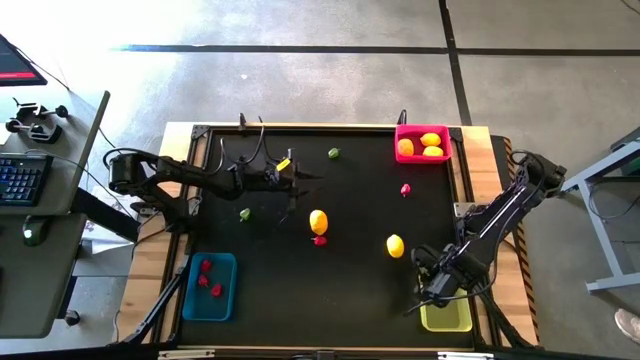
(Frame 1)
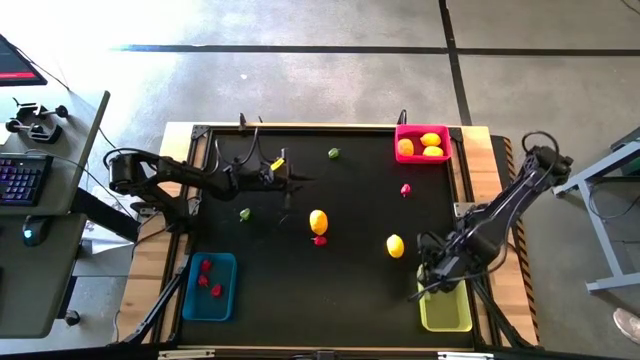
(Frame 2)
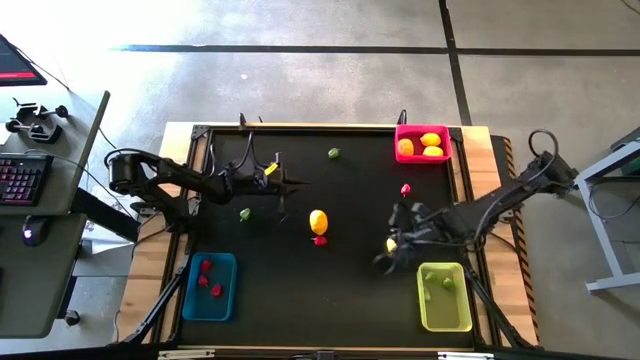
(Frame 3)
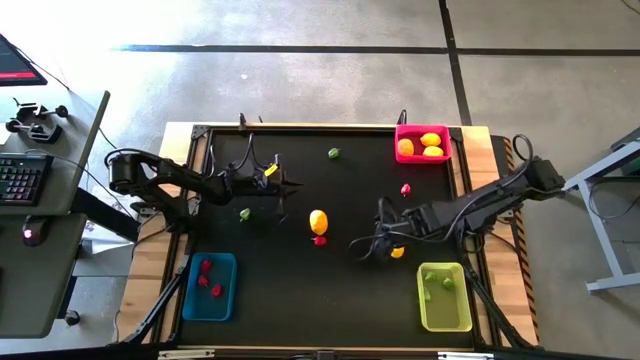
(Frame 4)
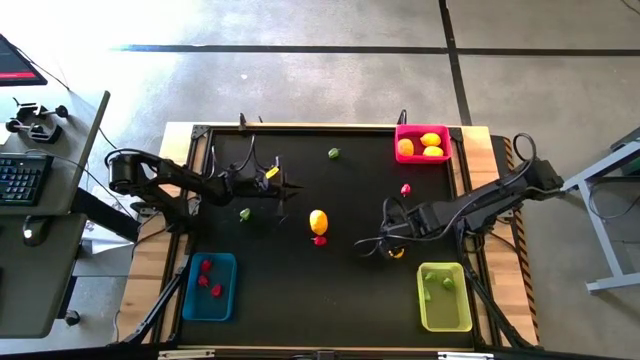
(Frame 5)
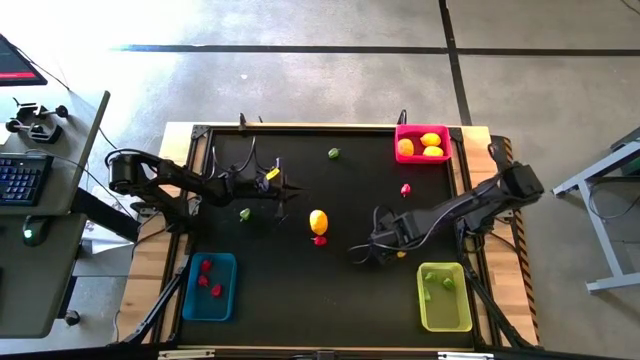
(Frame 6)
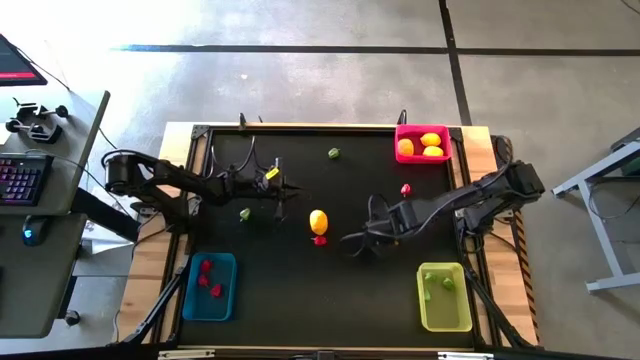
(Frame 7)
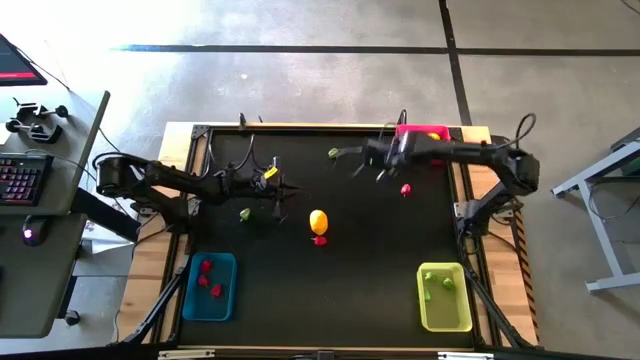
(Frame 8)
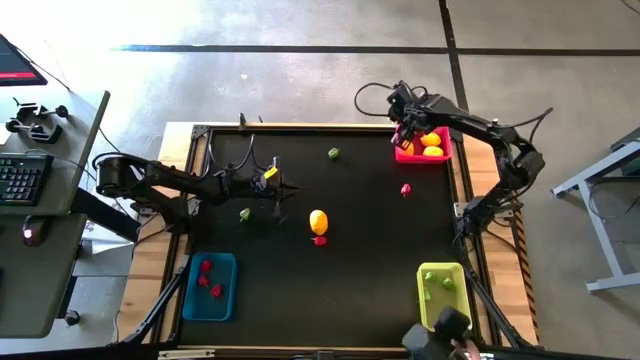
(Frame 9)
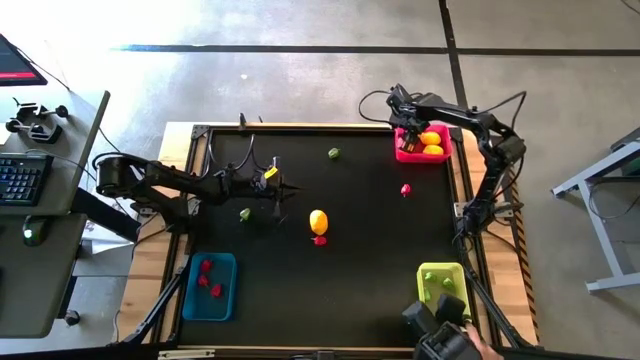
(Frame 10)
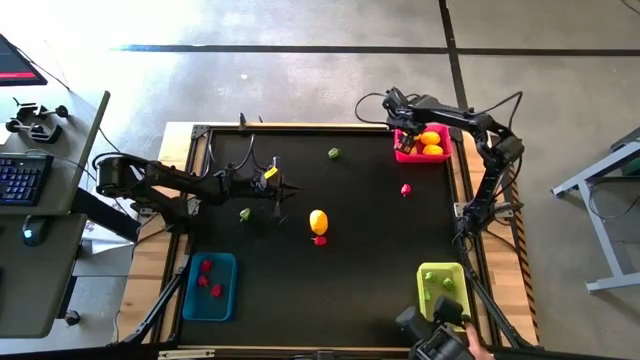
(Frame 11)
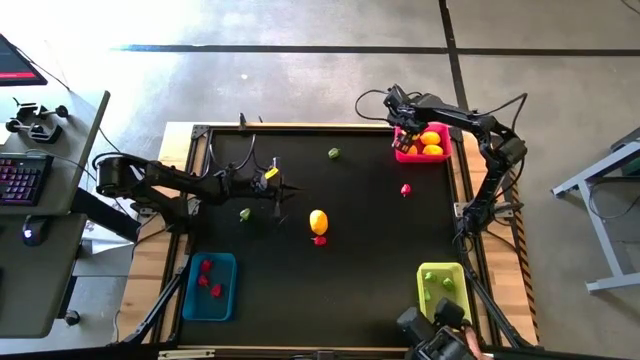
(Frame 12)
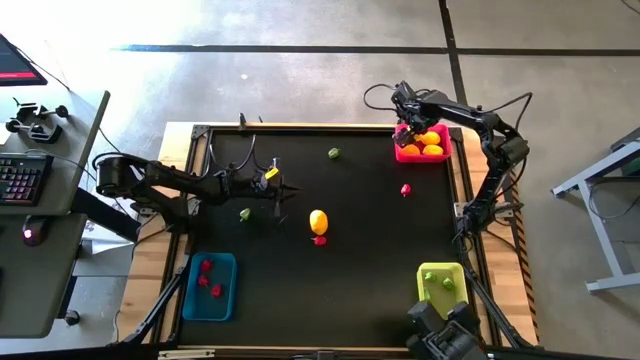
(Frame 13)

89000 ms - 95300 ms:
Task: Sort produce into baskets
Put the lemon into the pink bin

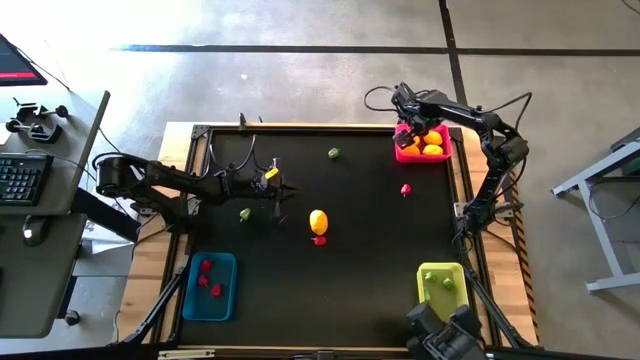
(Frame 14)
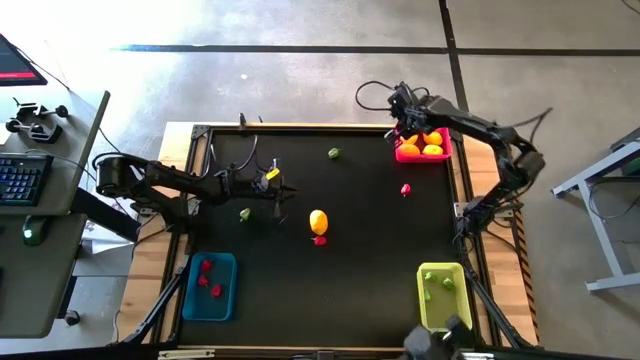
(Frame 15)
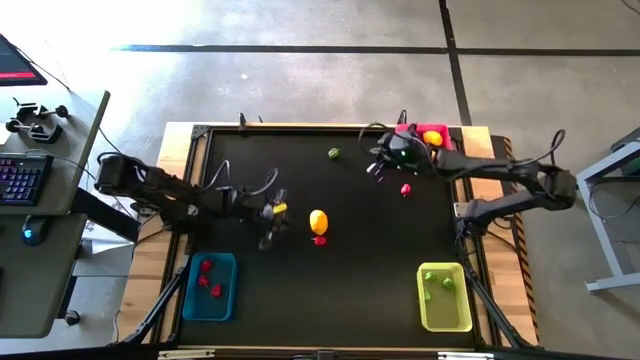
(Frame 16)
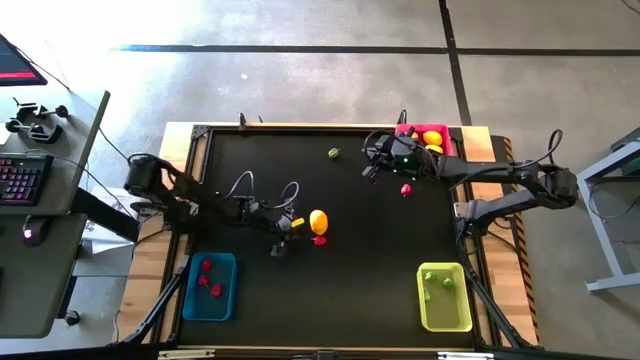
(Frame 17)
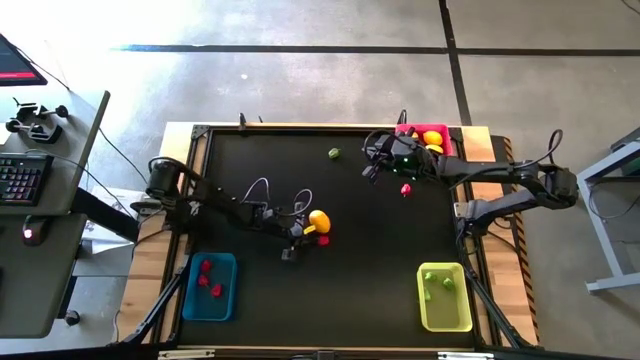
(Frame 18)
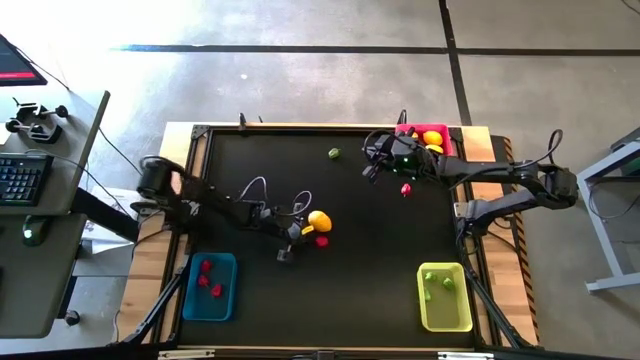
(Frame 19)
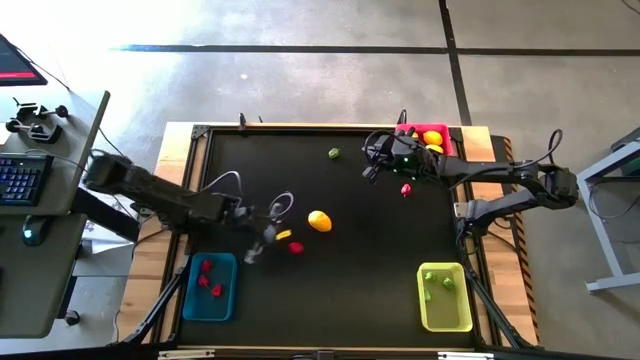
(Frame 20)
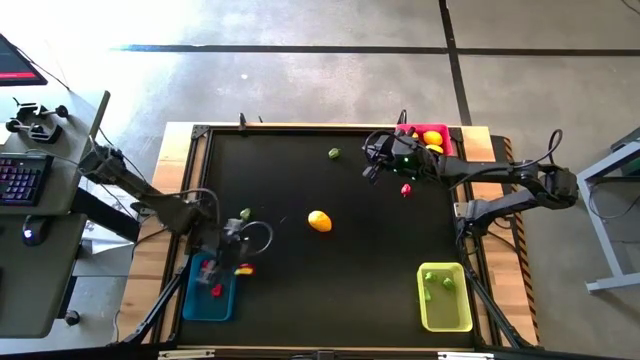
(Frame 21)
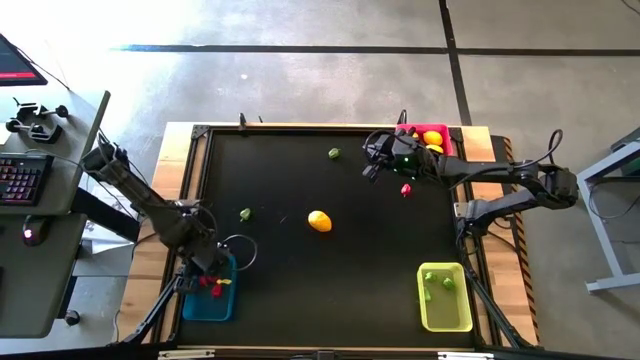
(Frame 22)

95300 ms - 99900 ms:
Put the red chilli pepper into the blue bin

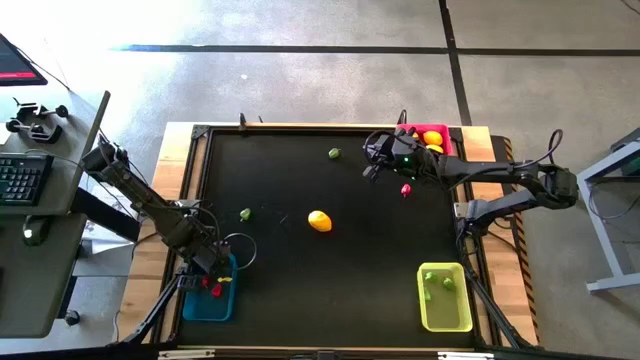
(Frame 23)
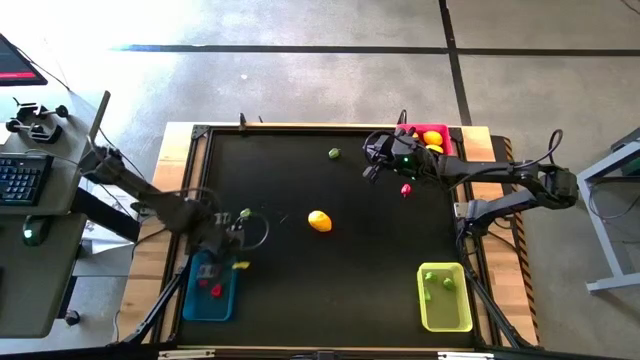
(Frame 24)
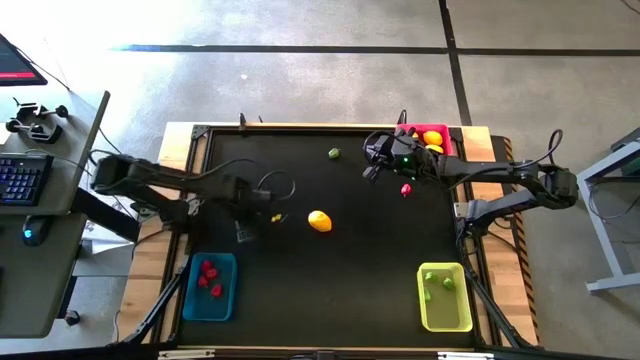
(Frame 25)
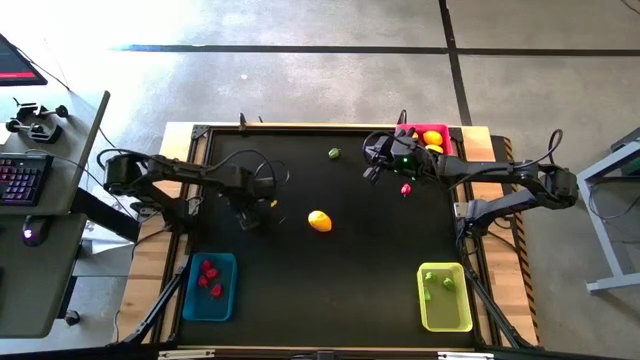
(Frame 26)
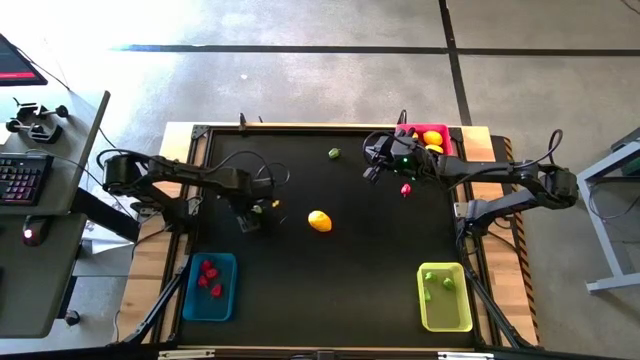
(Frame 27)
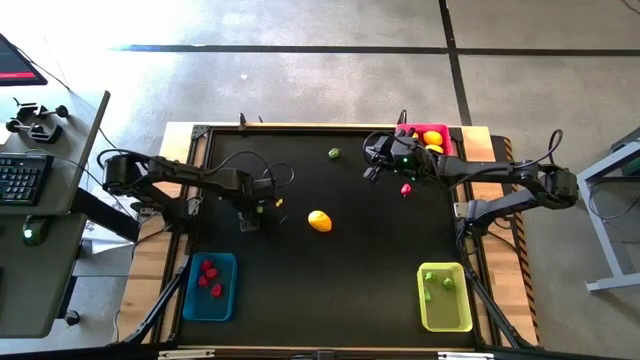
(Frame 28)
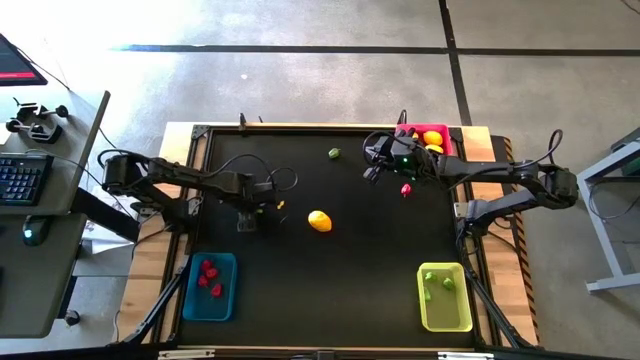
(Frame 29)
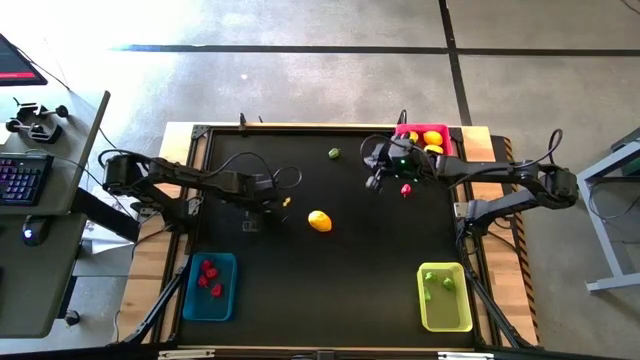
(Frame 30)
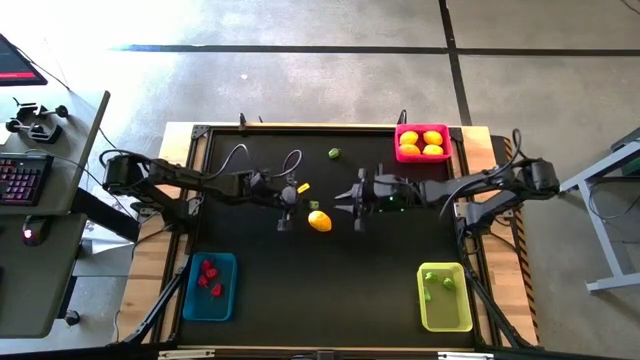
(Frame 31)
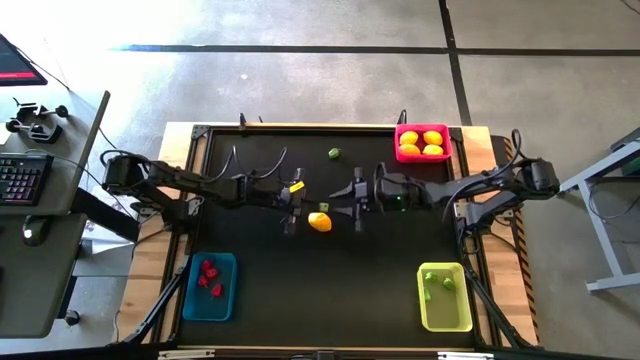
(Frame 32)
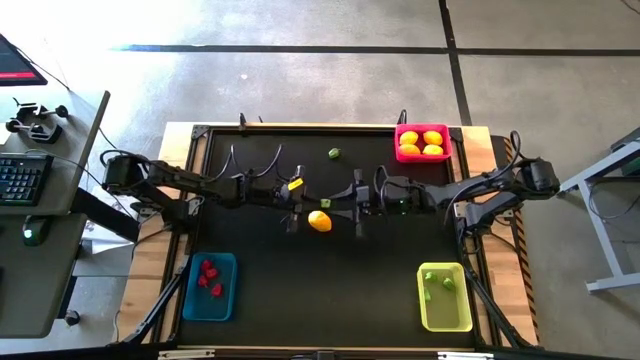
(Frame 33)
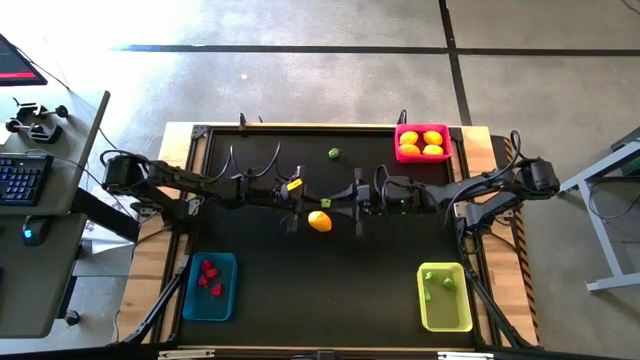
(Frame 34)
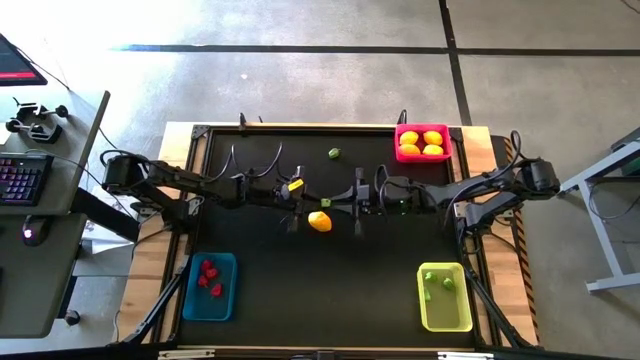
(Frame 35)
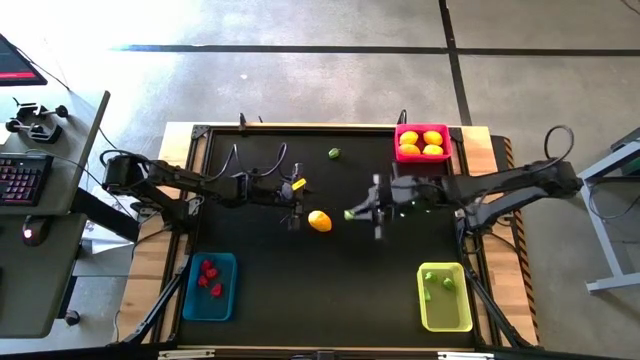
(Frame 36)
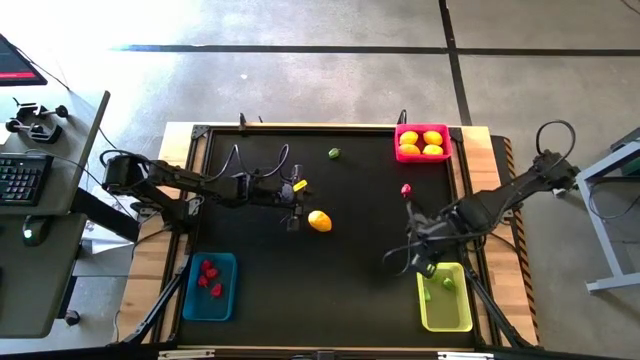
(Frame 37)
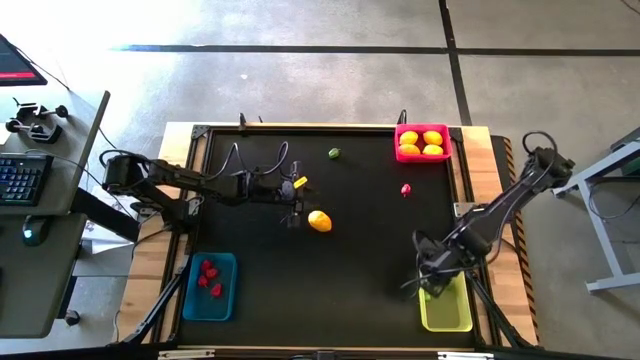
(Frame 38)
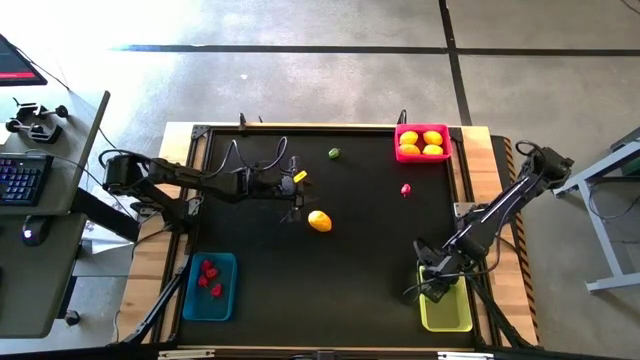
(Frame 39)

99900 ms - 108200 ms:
Put the green chilli pepper into the yellow bin

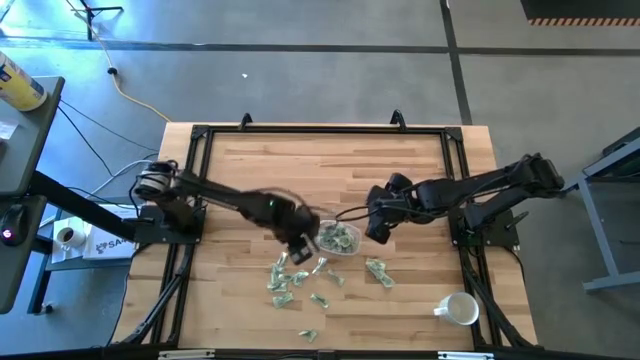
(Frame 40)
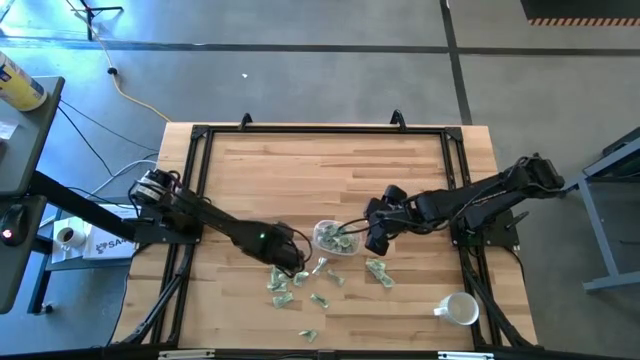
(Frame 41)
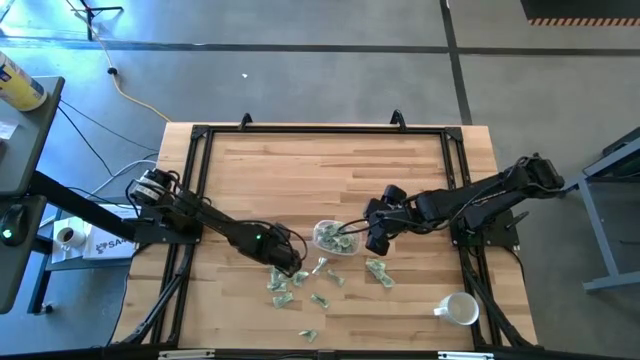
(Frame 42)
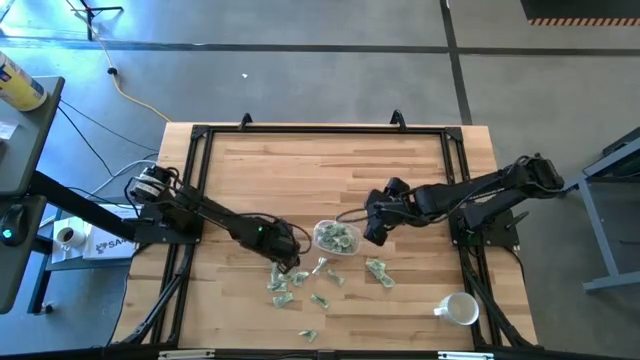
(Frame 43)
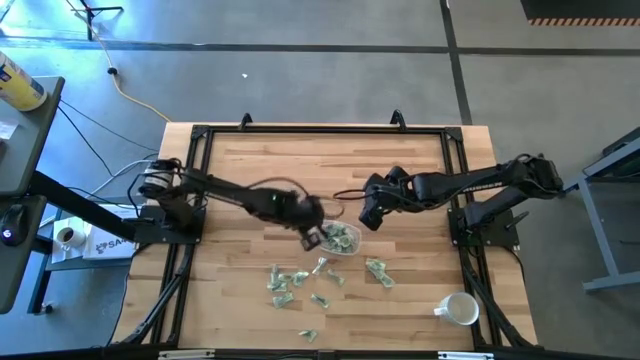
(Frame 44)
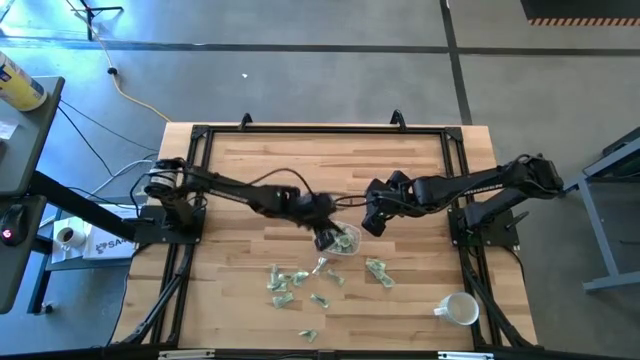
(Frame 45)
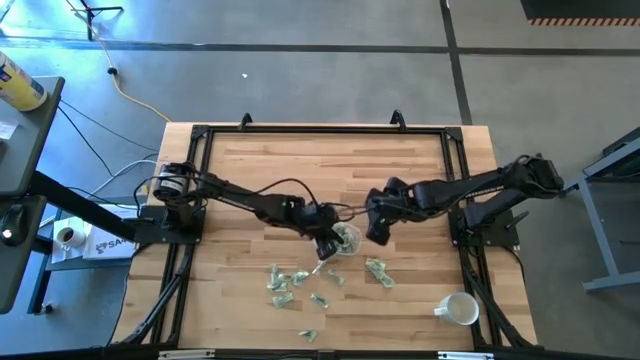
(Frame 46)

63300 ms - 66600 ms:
Task: Pick and place Stevia / Truvia into bins
Put the green stevia packet into the transparent container
